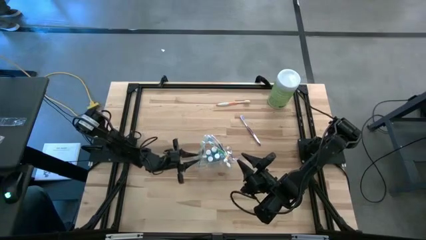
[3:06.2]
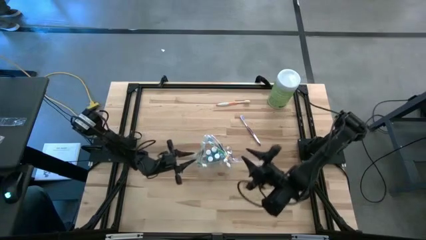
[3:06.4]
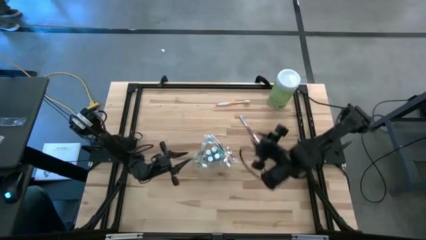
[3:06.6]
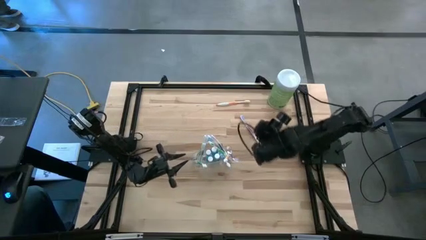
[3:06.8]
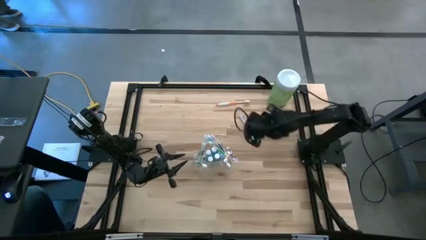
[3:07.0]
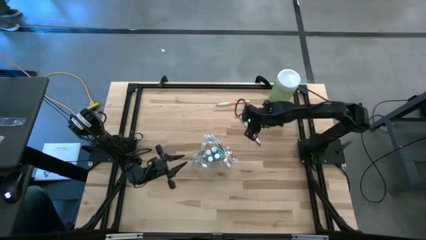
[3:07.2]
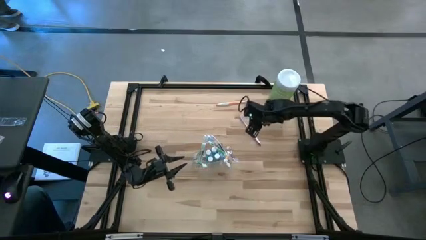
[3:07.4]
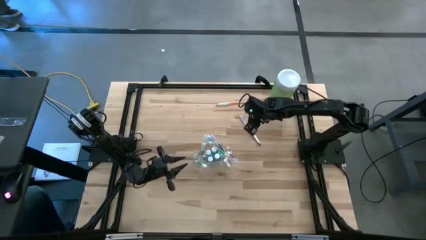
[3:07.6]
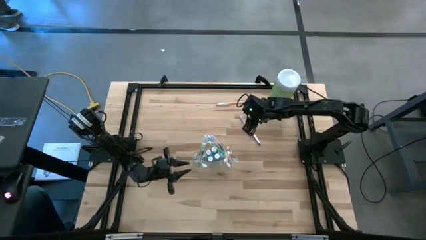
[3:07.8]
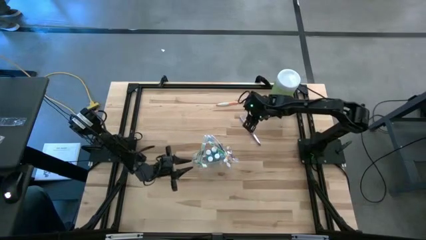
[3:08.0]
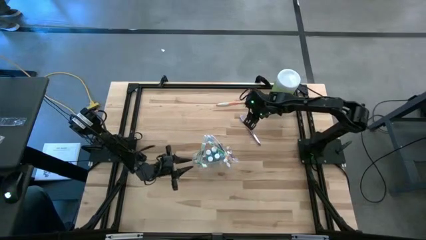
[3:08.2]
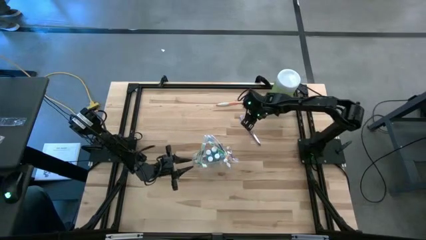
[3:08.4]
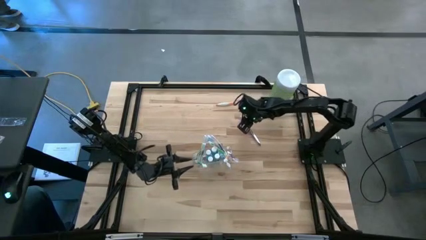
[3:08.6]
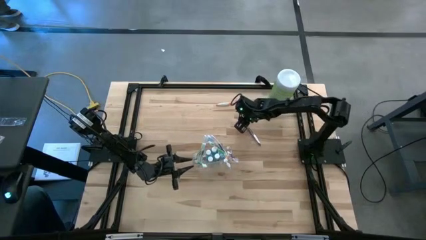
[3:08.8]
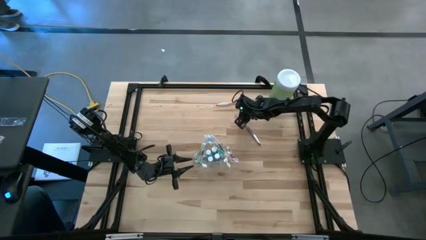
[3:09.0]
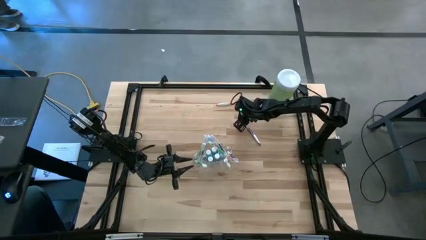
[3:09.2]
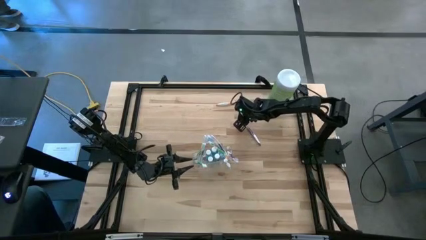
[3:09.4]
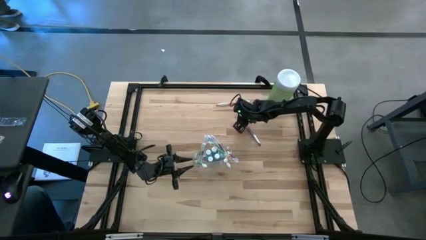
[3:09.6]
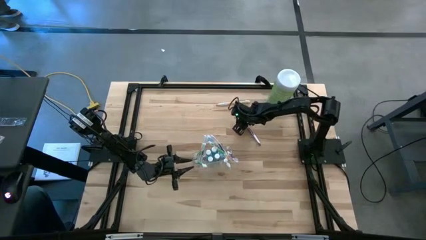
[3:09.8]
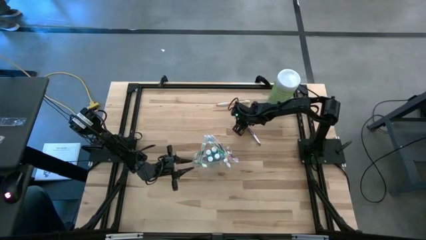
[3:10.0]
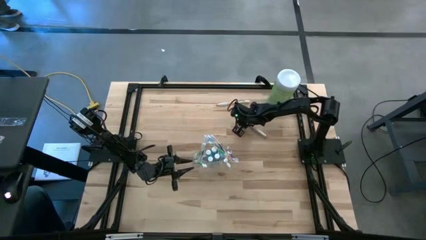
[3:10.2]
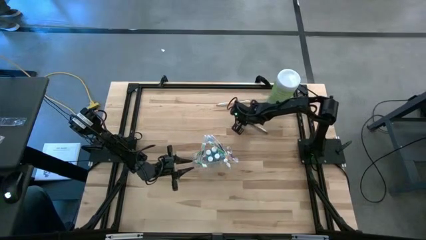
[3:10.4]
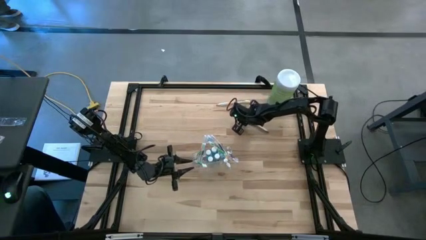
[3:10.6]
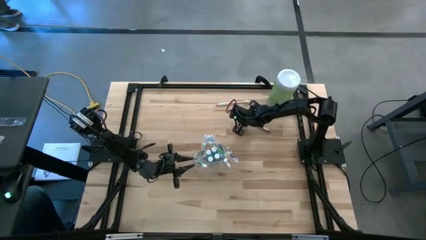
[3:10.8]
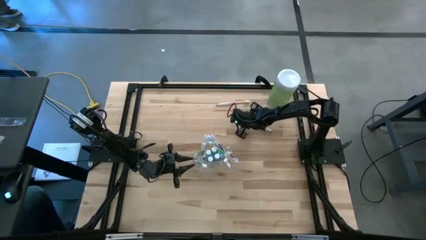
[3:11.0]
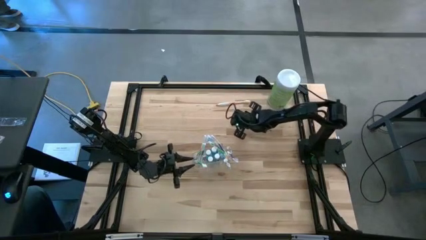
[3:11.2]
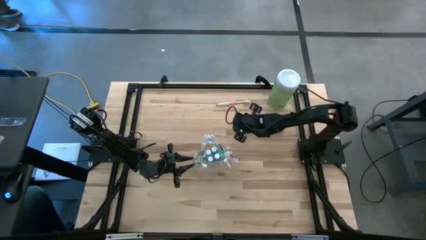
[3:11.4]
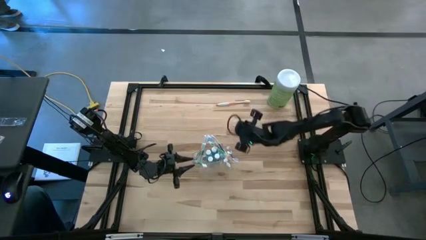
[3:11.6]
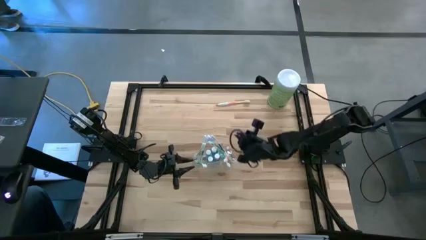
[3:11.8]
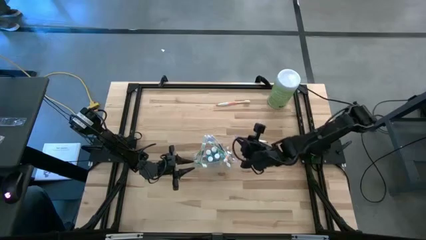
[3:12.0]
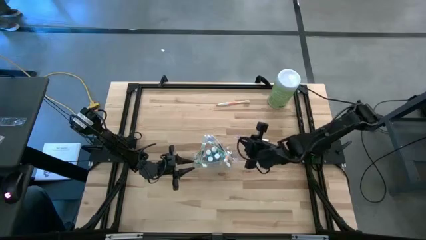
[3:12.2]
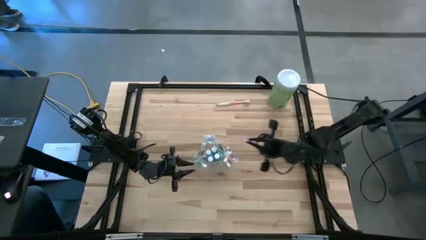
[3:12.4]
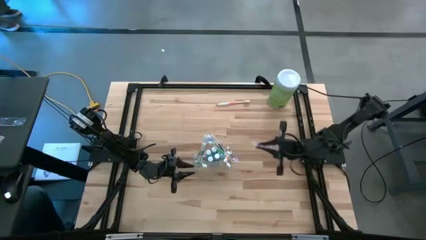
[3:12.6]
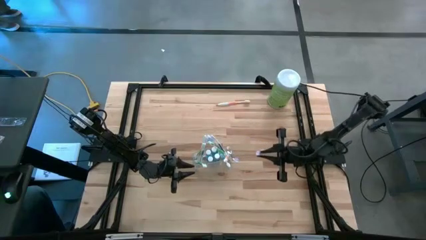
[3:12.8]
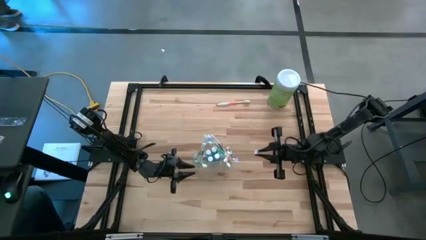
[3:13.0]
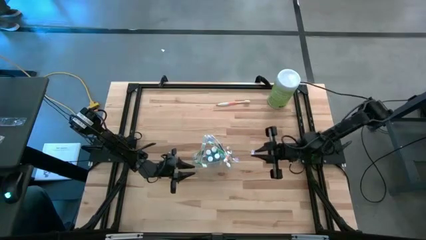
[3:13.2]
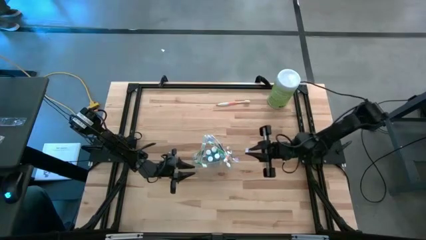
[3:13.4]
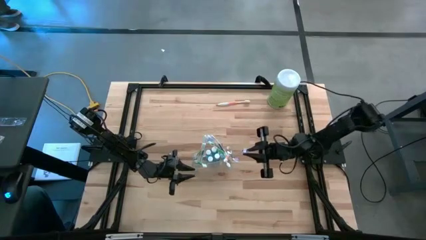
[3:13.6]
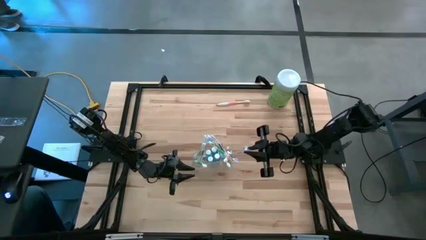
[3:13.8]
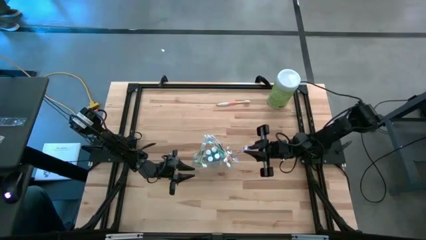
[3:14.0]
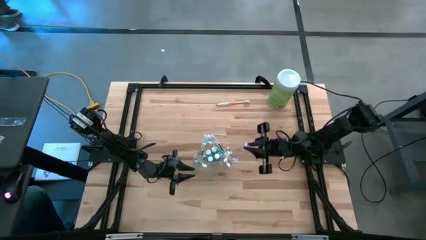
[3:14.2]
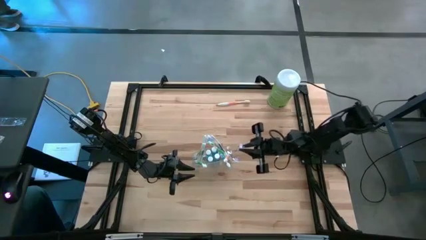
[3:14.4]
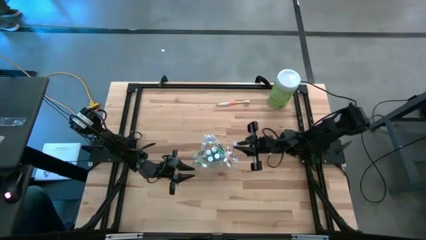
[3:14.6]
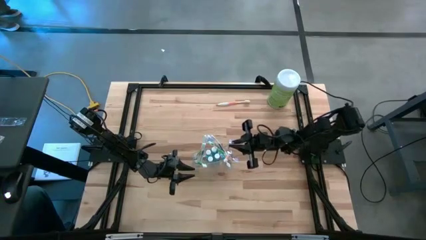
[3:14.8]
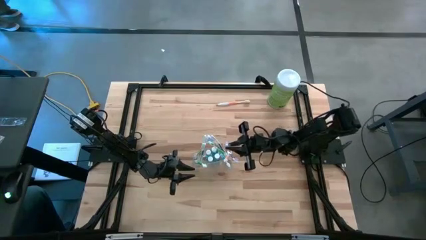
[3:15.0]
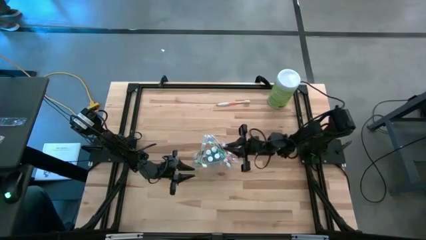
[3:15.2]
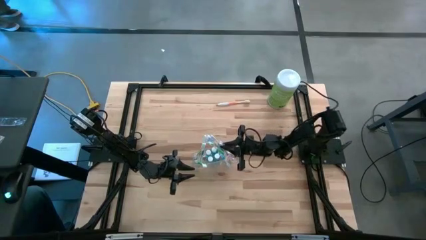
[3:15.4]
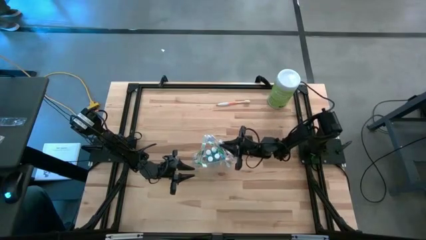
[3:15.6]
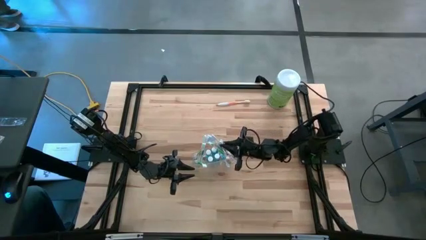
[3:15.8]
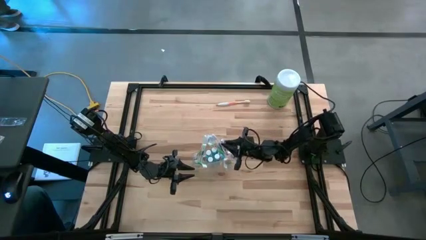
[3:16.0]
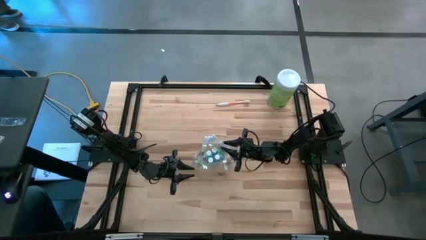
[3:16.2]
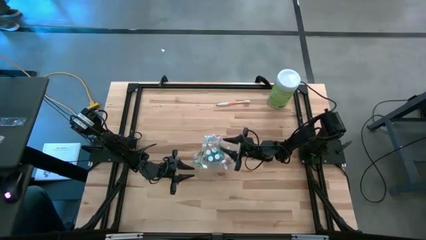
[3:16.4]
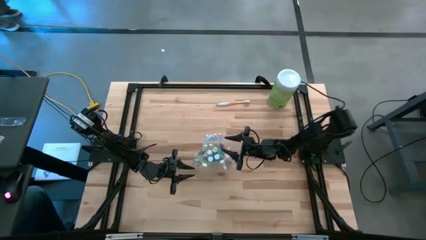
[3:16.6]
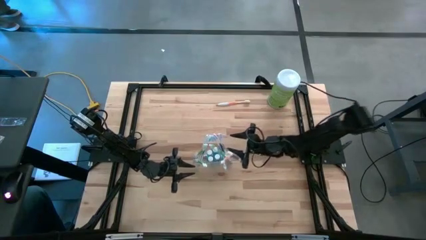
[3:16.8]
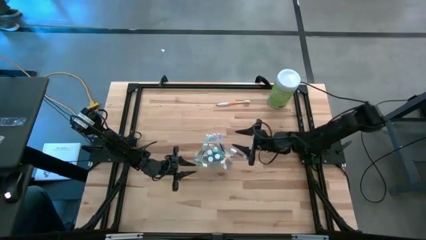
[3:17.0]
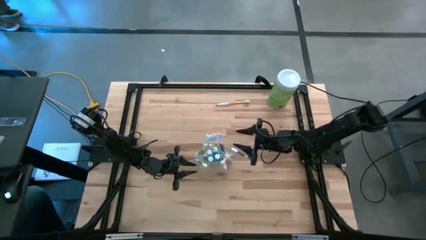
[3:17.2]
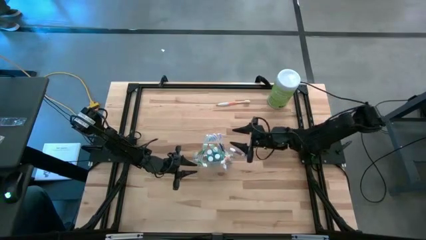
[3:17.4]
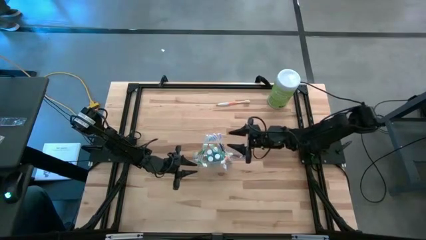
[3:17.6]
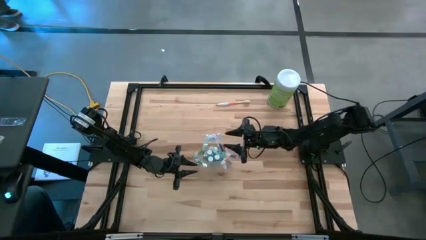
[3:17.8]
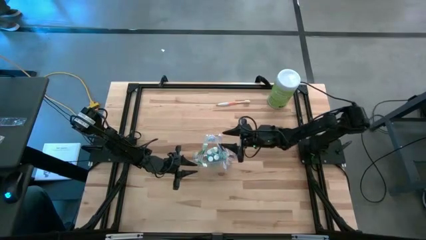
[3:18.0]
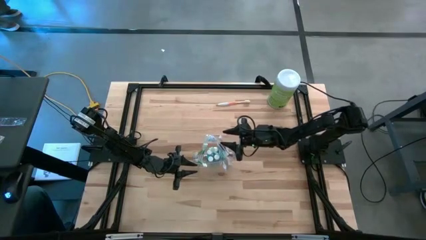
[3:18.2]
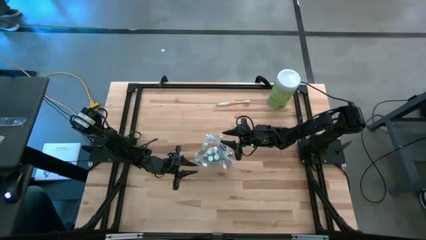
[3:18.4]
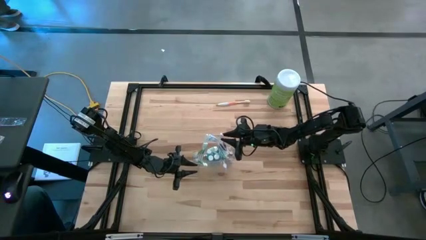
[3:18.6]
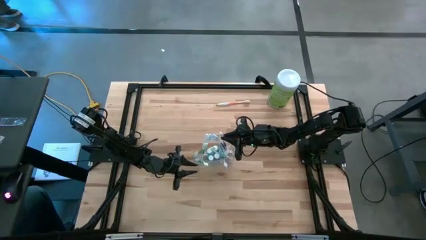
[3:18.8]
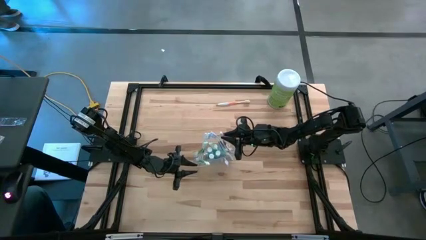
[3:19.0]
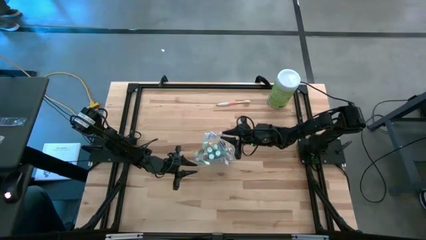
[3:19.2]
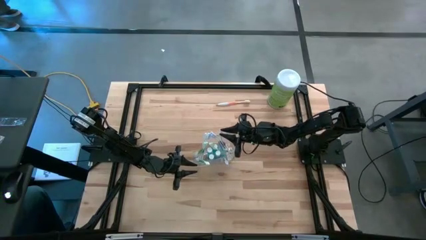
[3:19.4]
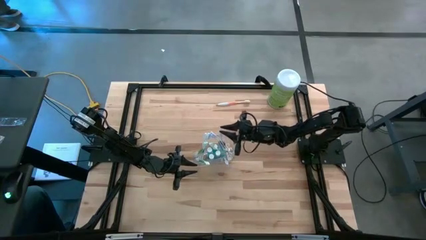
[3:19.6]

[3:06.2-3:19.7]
Task: Pick & Place toothbrushing station
Put the purple toothbrush into the right side of the transparent organizer
